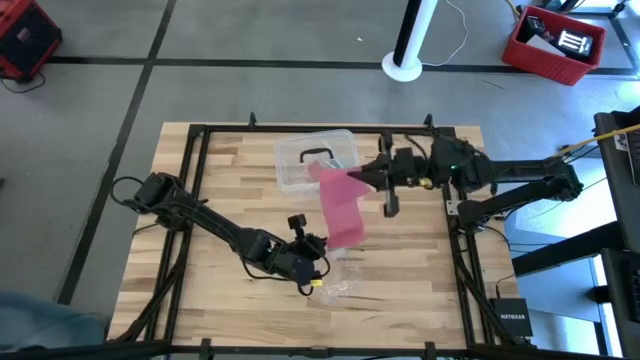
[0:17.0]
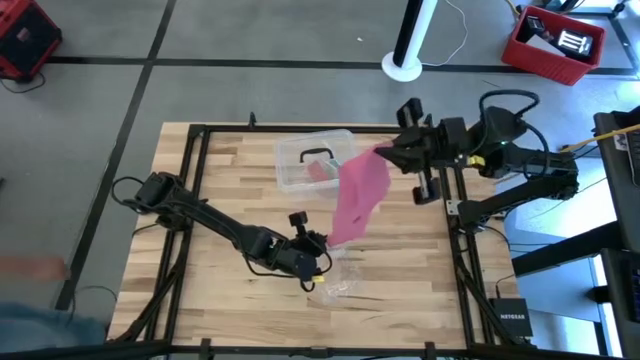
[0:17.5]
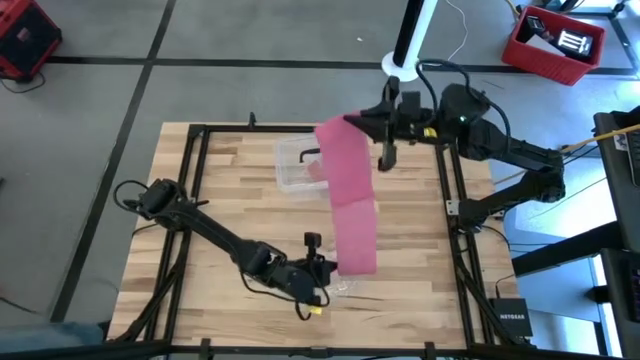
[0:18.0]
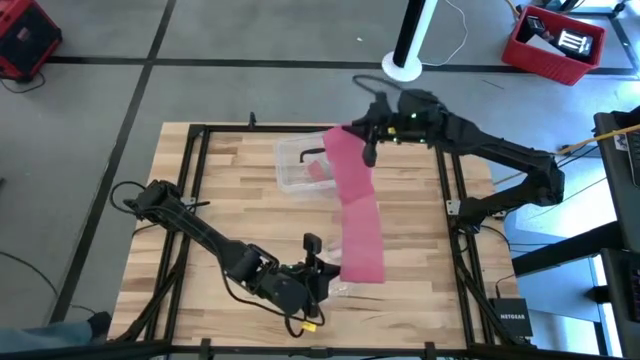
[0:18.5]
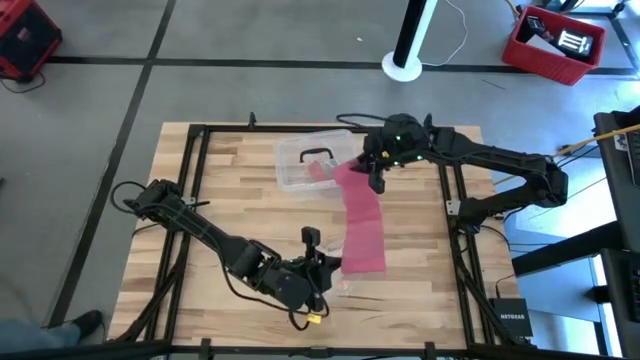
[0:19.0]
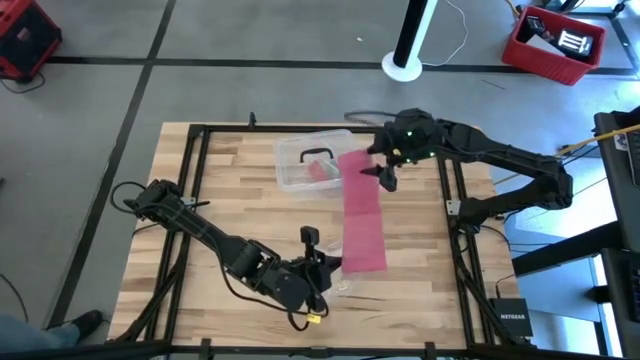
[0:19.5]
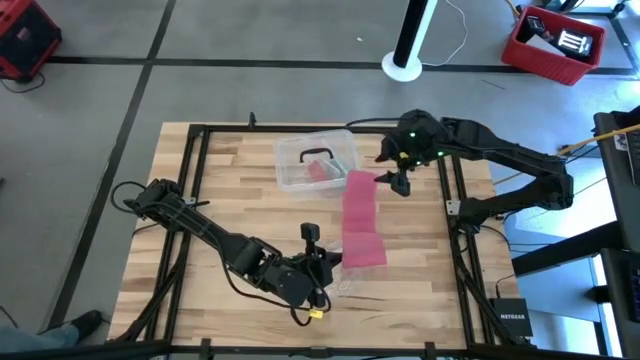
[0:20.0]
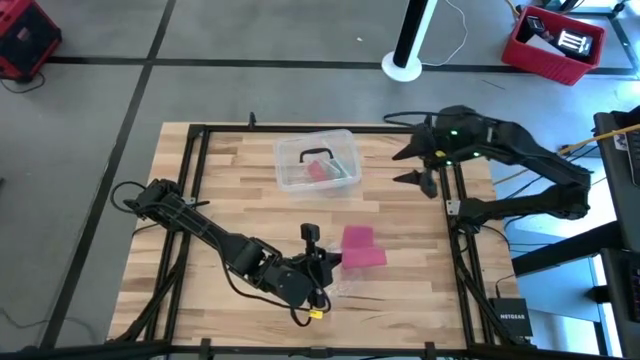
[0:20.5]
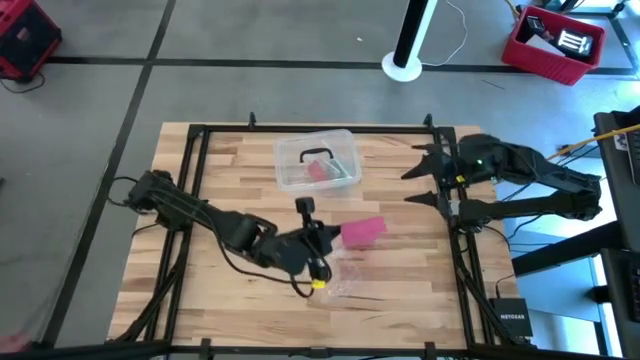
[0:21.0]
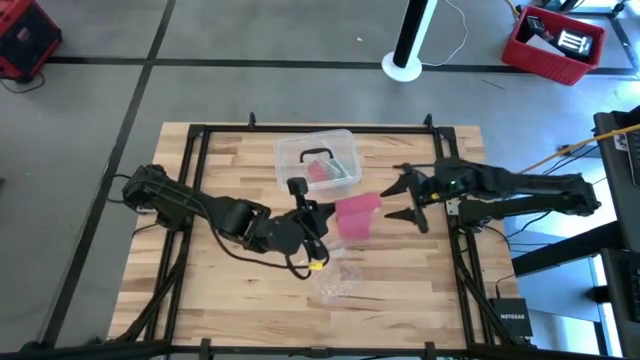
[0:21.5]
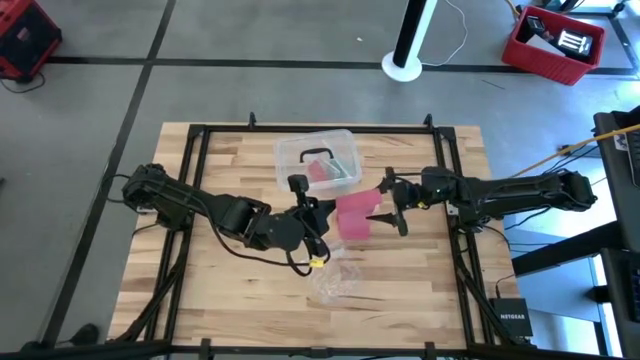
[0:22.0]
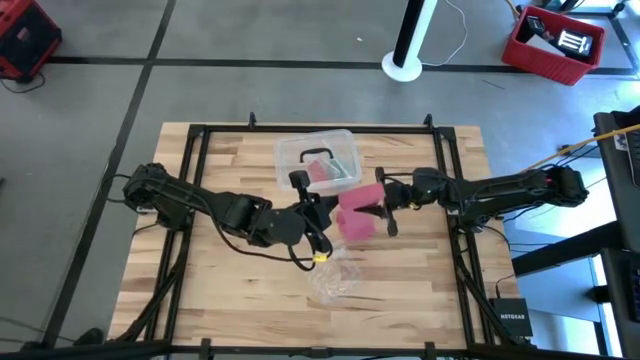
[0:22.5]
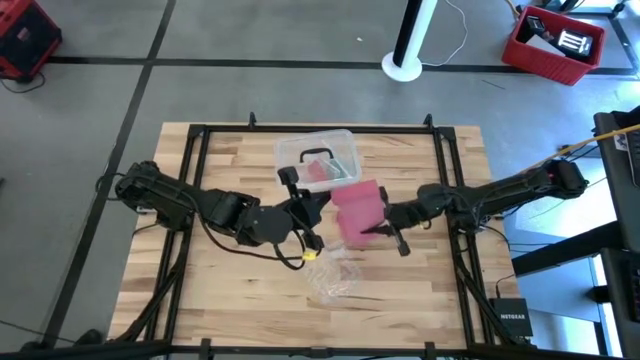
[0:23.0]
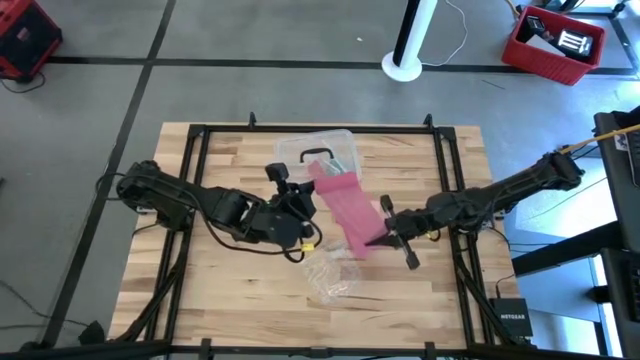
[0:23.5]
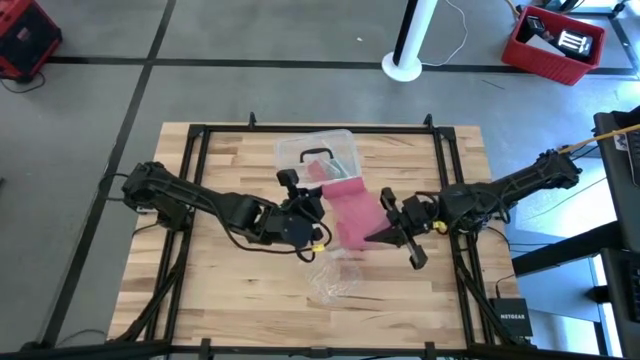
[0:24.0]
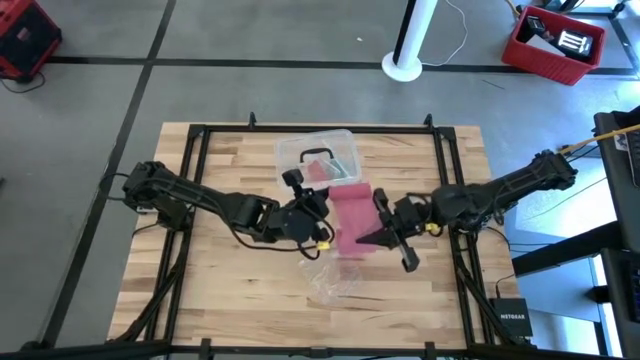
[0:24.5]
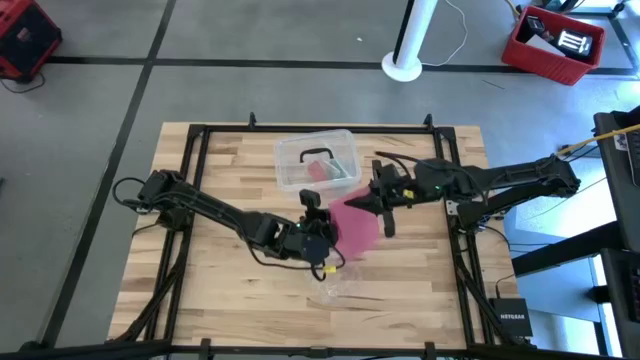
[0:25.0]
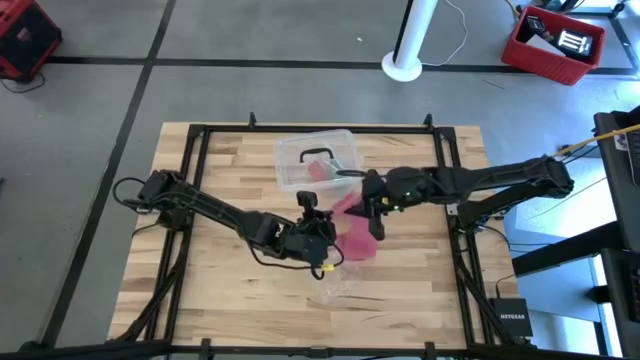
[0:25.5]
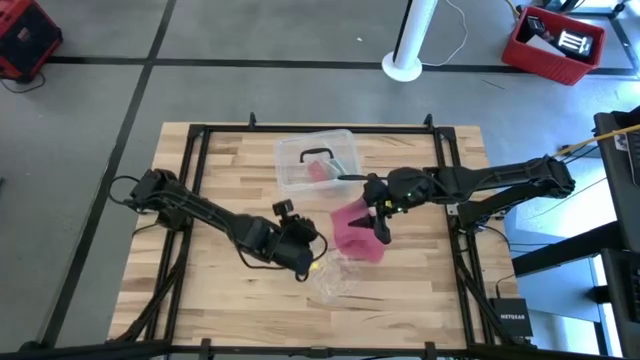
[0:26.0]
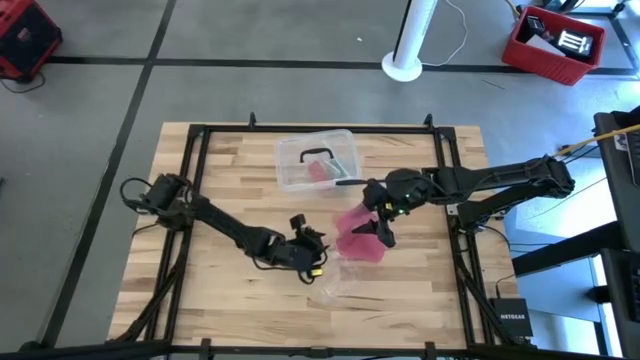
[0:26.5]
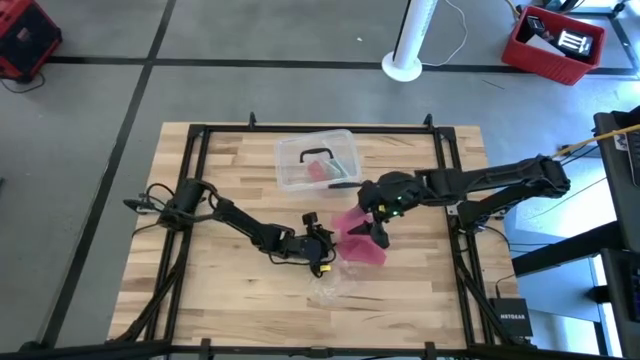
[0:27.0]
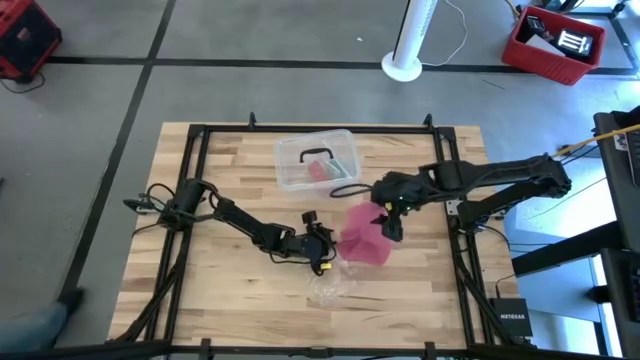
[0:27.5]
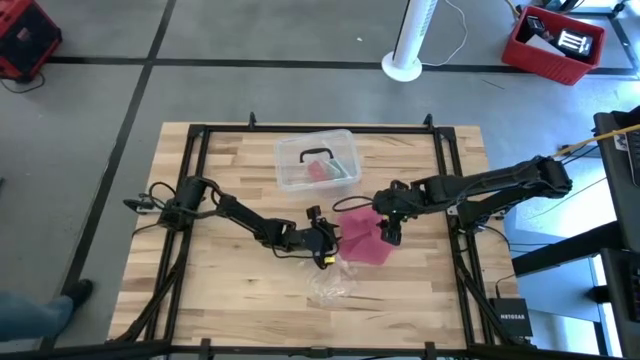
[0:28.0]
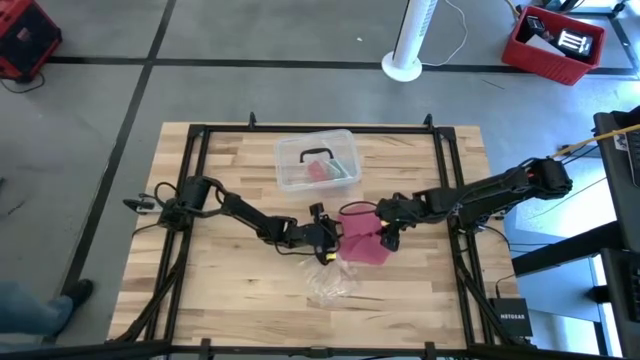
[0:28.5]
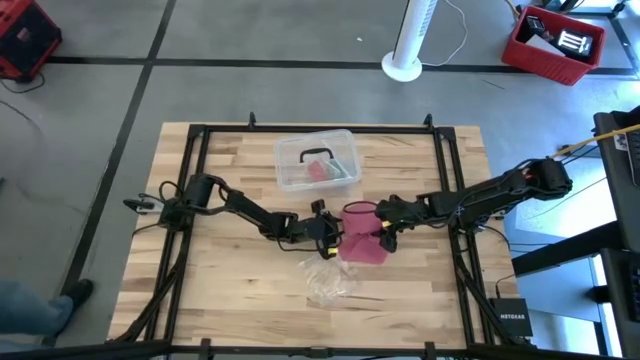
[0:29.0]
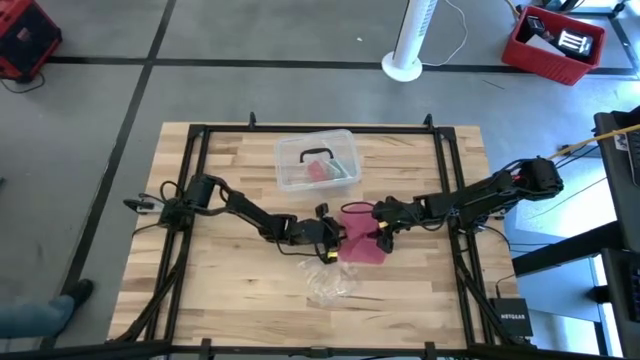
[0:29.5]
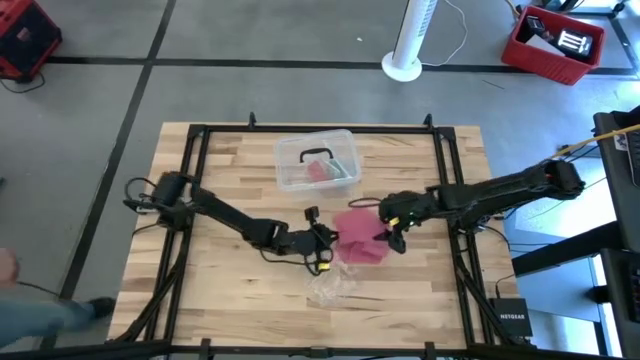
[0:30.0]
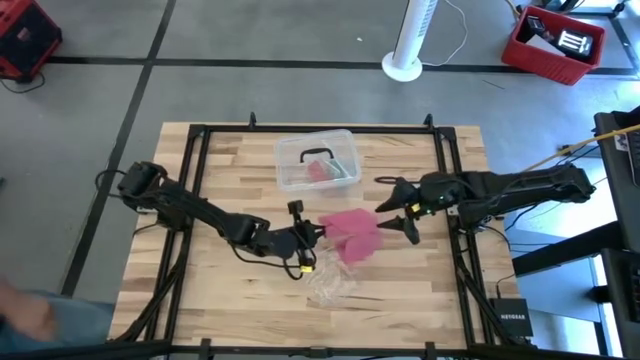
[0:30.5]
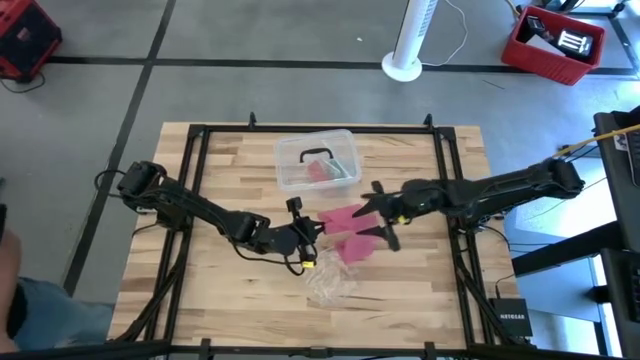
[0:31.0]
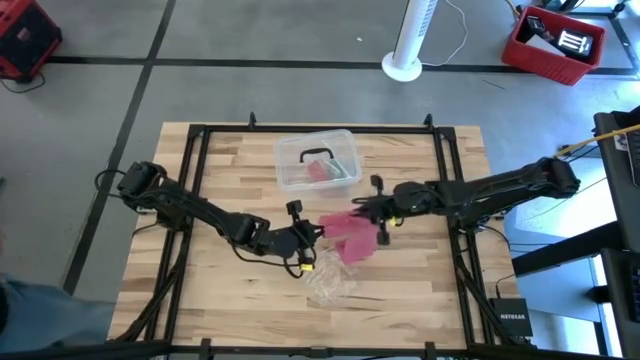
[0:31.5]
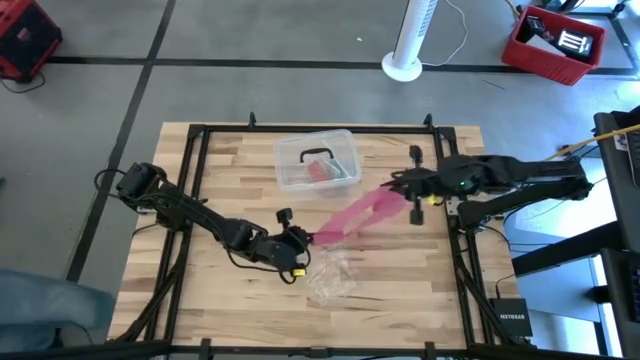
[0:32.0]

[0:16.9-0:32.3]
Task: Roll bandage
Roll the pink bandage
